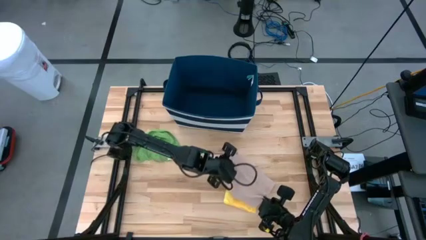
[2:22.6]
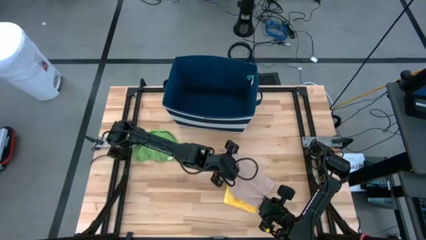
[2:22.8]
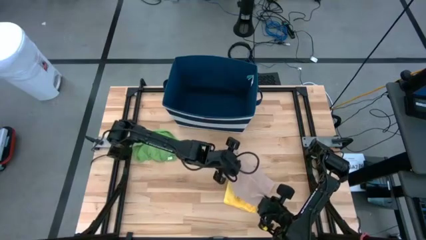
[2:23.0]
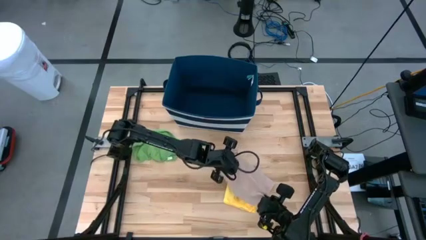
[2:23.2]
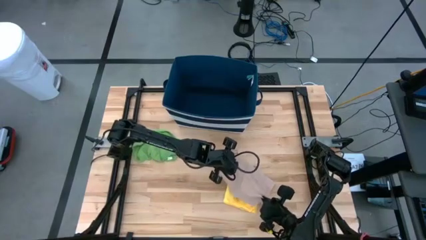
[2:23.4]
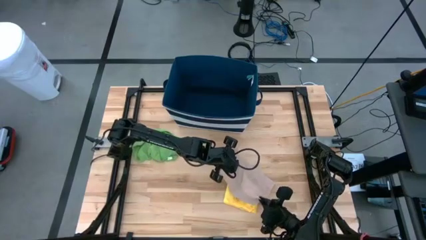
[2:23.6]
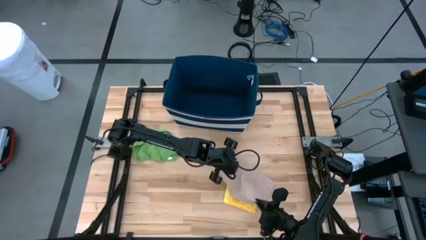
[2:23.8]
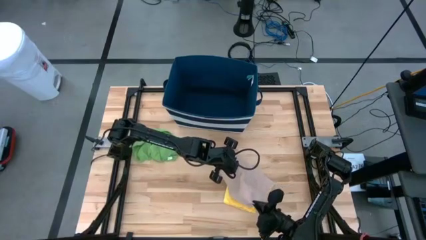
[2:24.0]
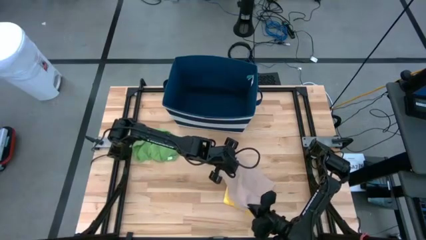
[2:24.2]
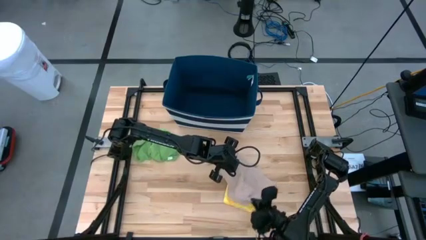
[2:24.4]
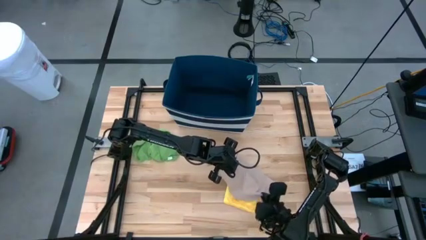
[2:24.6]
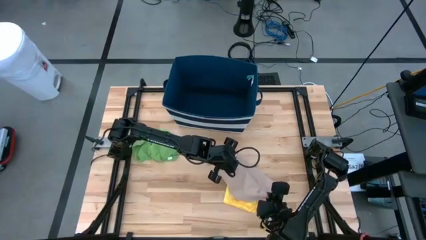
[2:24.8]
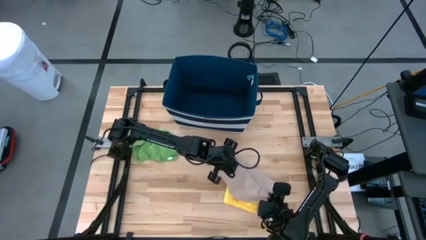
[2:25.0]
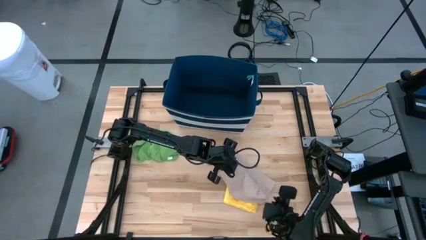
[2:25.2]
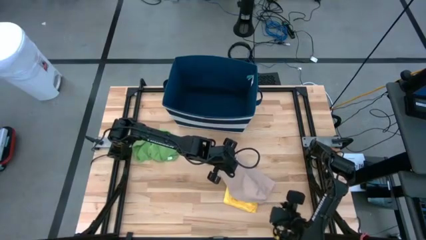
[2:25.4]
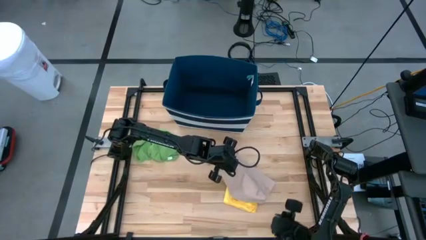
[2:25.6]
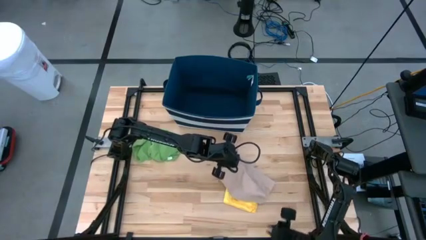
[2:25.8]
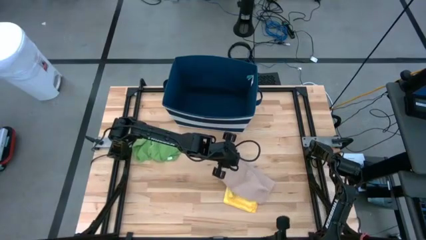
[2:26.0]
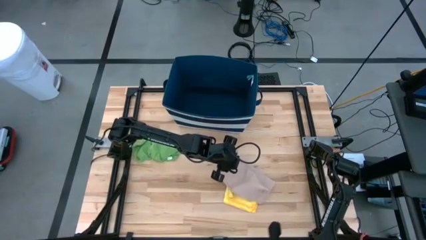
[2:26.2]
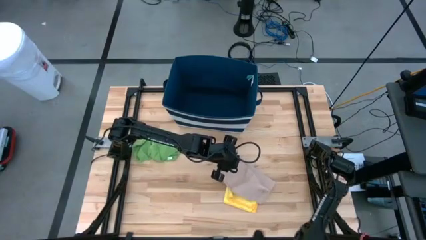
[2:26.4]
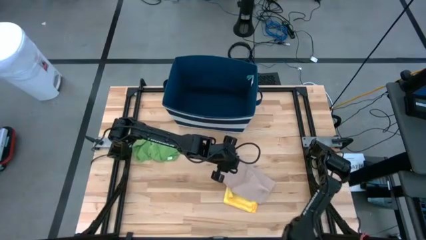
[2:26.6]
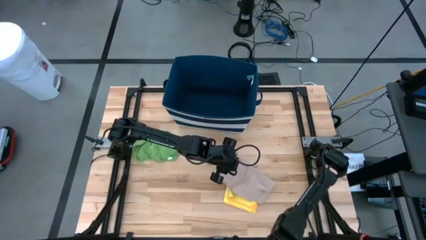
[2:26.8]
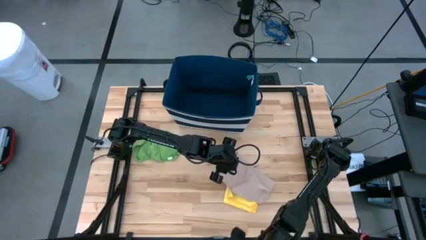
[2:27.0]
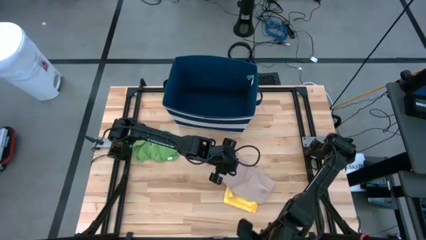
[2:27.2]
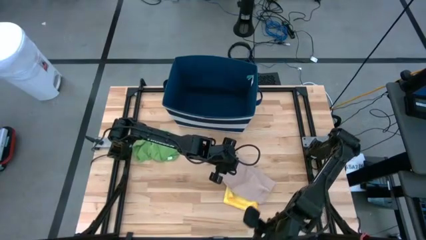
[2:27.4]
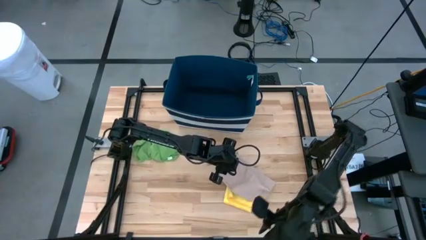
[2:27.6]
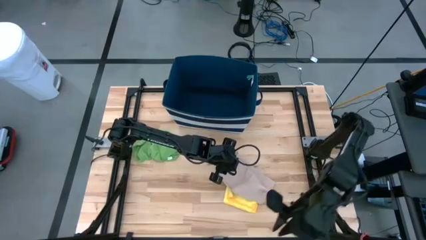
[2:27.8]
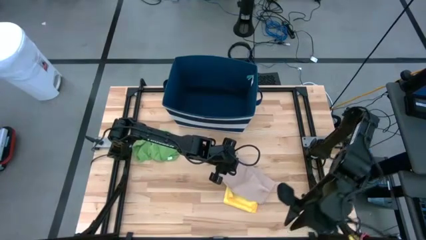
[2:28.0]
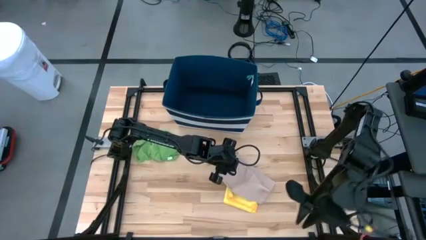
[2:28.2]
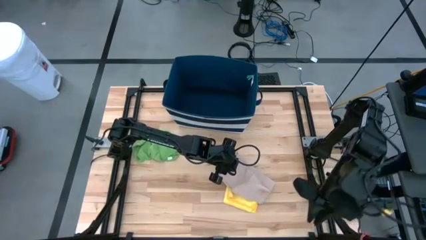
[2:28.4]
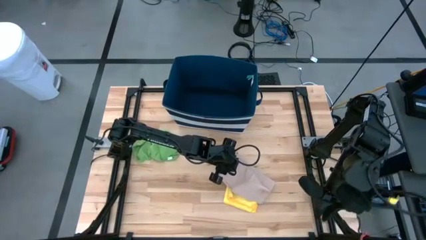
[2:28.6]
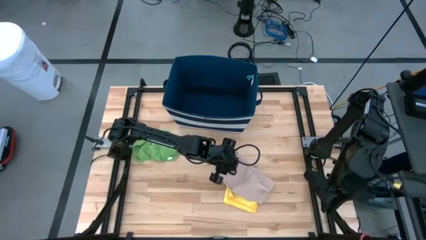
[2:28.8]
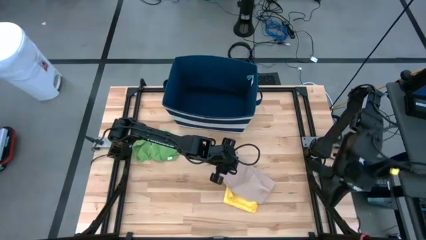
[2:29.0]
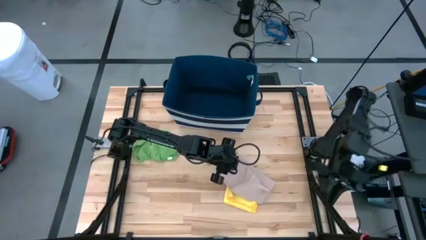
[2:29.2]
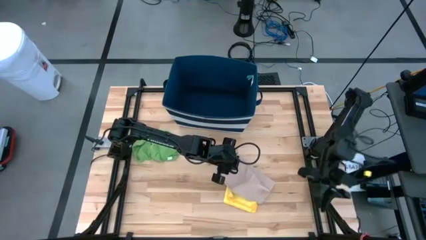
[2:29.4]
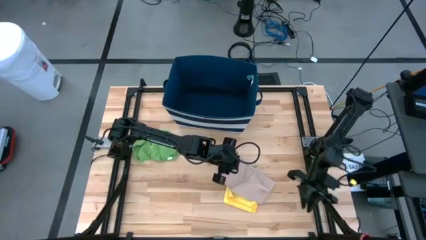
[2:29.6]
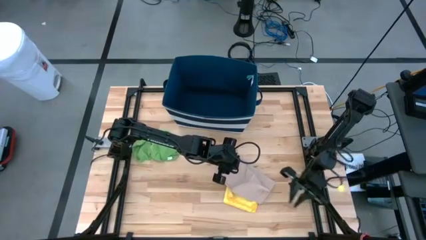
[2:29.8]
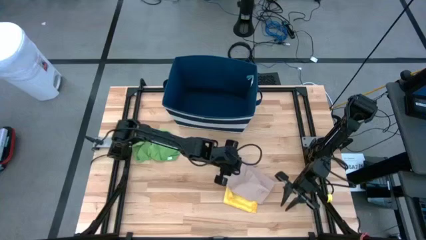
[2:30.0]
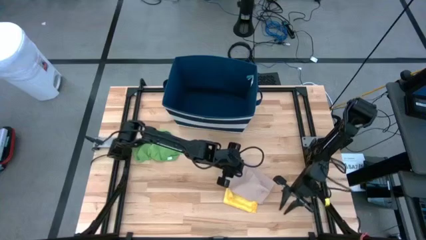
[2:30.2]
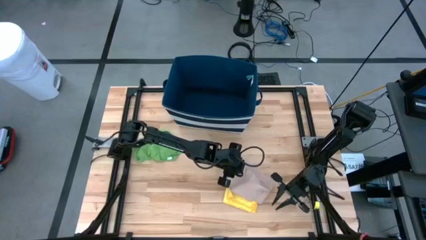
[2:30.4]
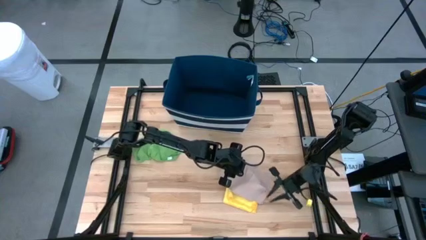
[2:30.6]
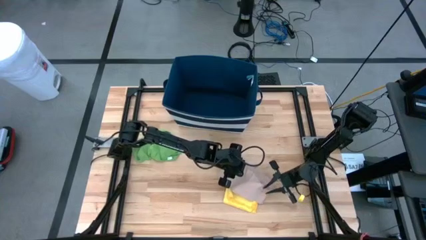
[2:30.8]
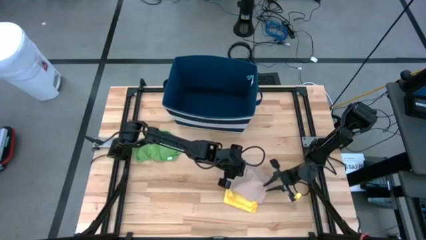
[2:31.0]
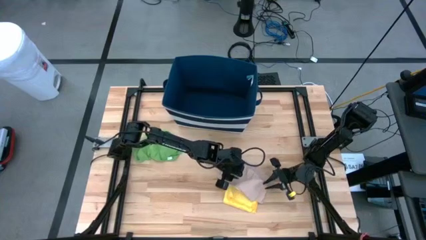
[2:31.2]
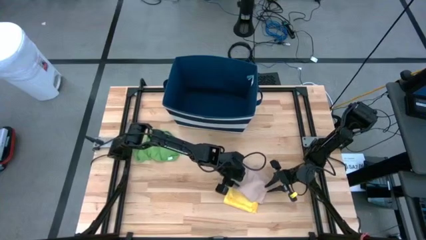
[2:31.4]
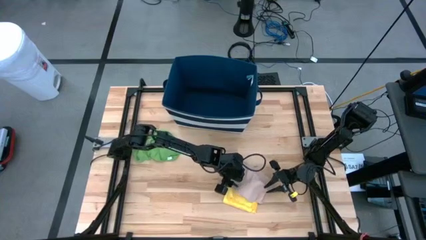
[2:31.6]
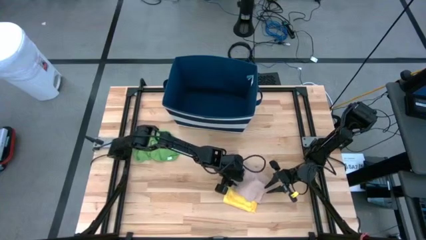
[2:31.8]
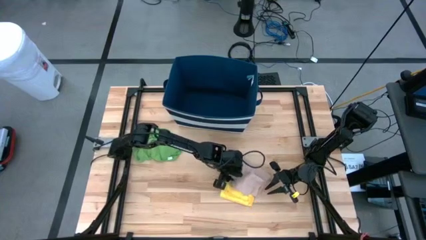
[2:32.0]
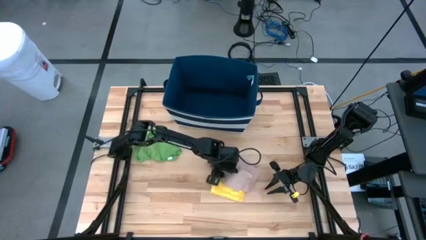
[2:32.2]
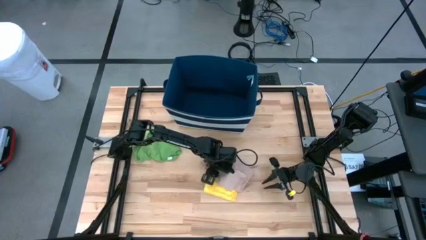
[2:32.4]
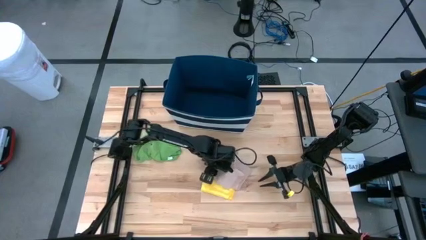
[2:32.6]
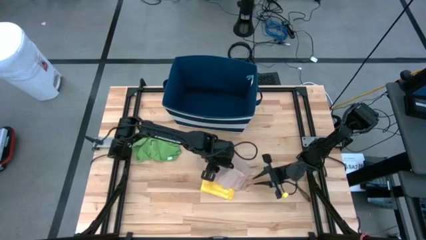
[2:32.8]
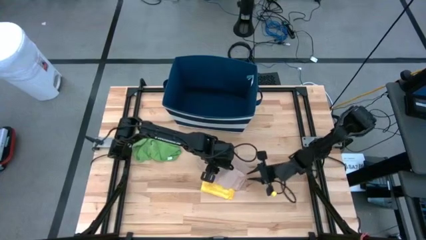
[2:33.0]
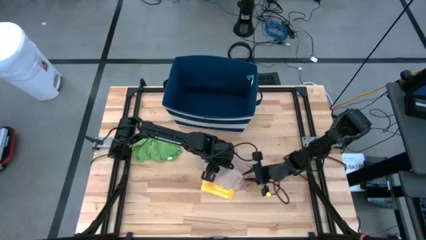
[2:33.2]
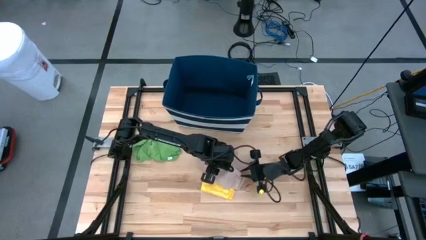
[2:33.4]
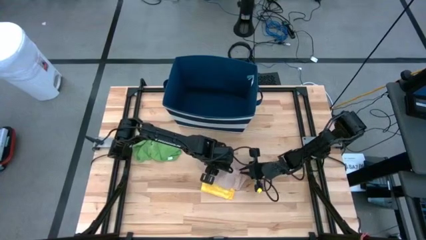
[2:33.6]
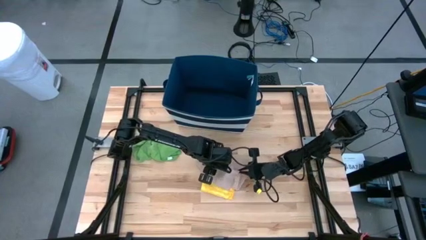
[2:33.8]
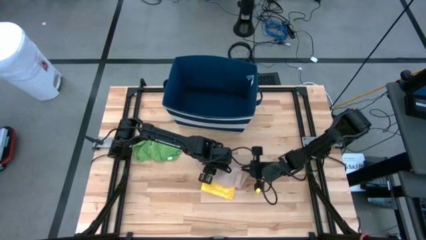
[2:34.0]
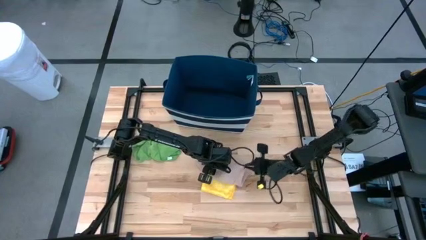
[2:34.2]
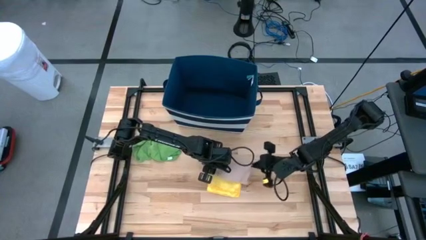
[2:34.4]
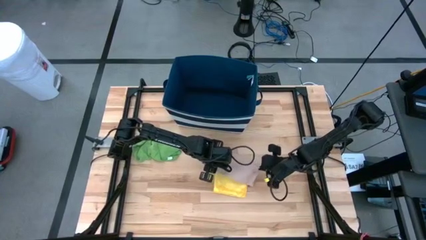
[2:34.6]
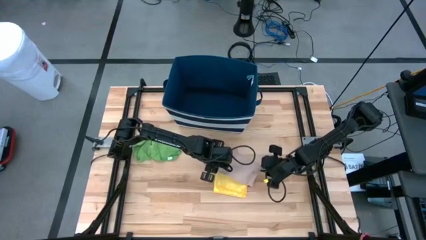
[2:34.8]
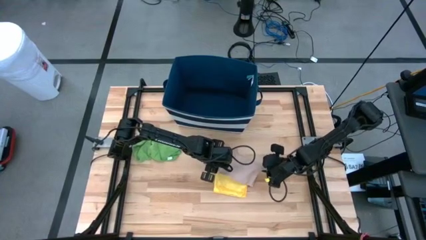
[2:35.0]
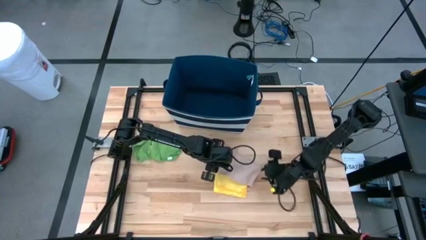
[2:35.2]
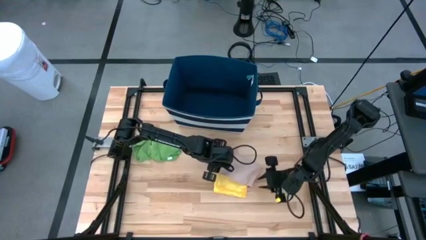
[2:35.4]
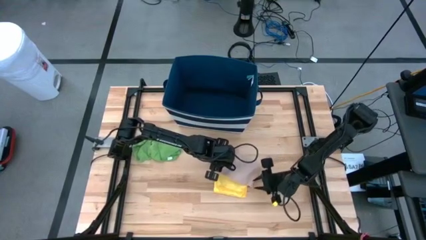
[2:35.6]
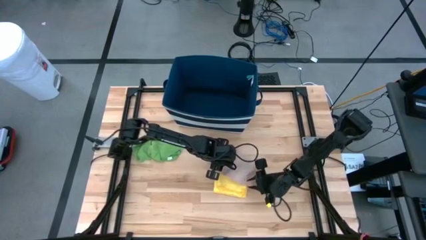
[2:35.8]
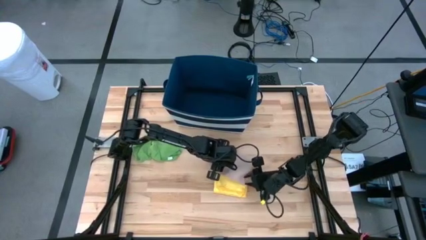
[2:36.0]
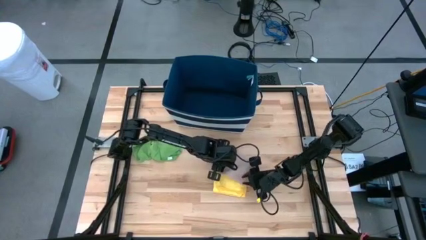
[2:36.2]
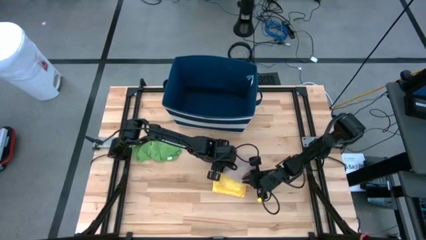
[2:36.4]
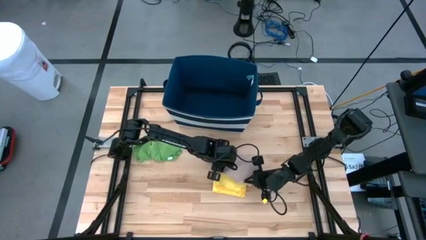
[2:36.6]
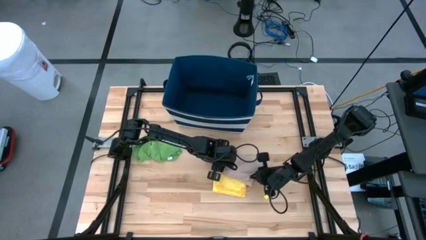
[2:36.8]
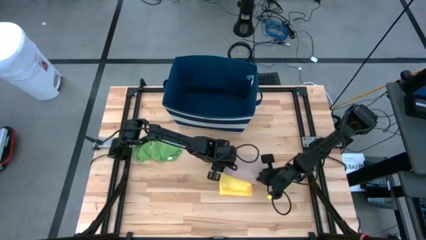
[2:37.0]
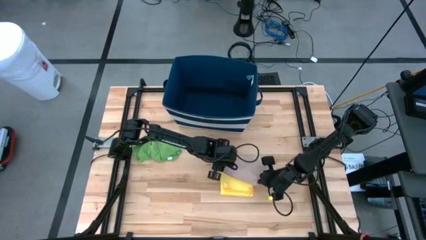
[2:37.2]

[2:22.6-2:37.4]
Task: Fold towel
Fold the brown towel
